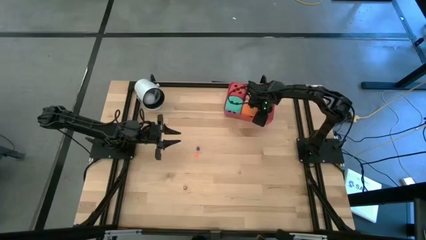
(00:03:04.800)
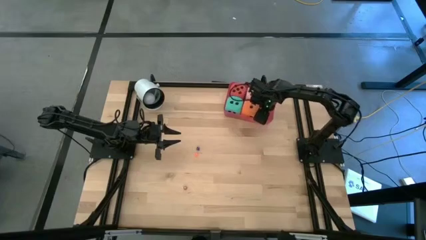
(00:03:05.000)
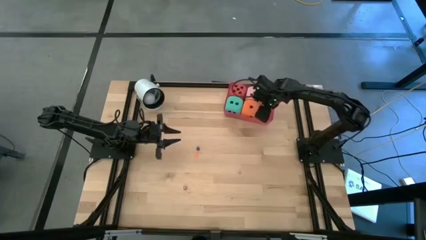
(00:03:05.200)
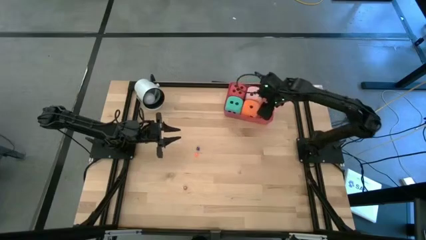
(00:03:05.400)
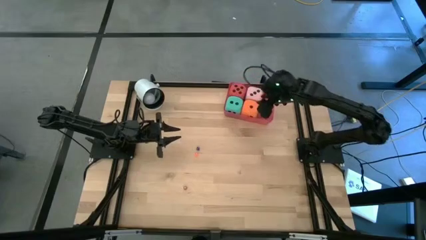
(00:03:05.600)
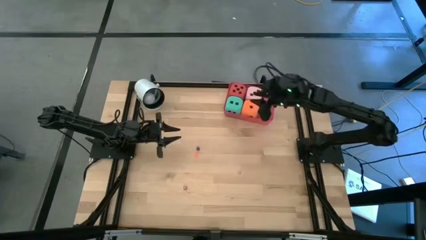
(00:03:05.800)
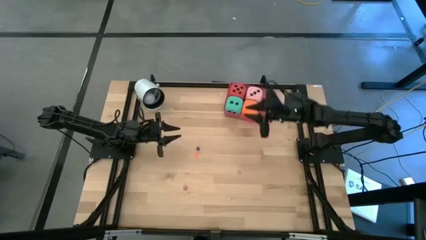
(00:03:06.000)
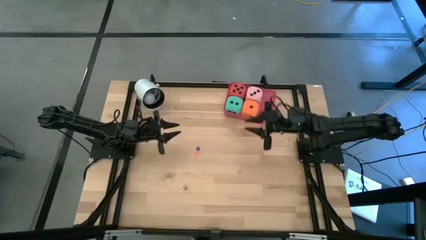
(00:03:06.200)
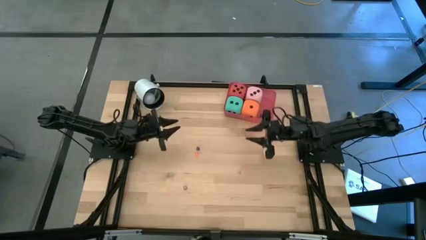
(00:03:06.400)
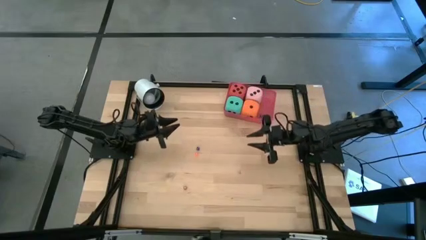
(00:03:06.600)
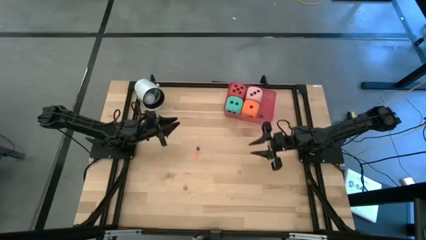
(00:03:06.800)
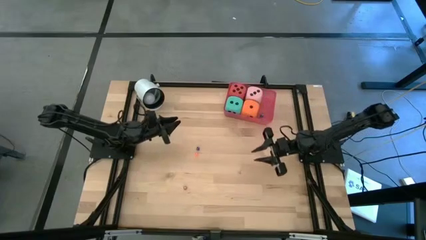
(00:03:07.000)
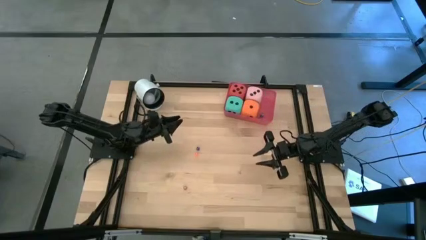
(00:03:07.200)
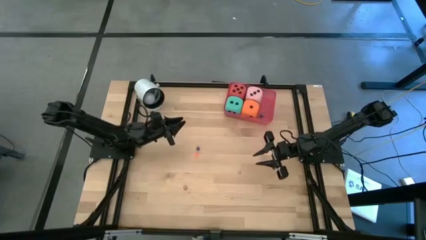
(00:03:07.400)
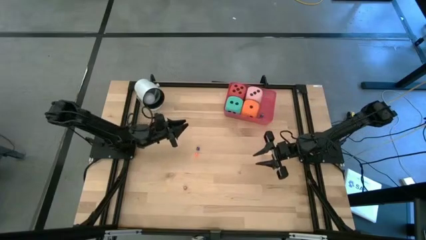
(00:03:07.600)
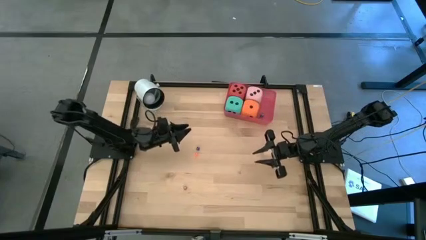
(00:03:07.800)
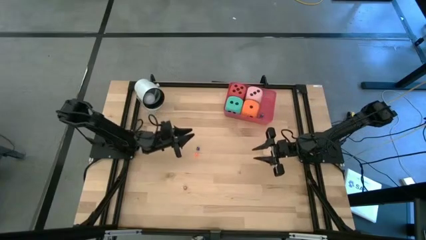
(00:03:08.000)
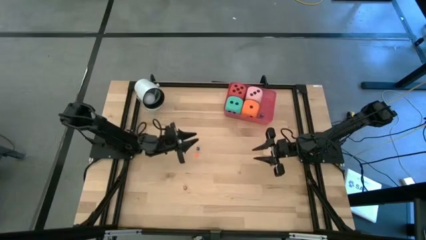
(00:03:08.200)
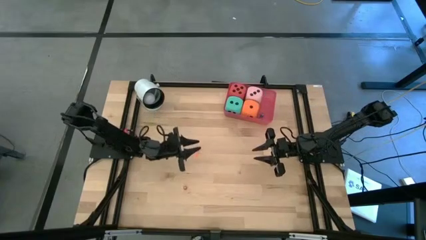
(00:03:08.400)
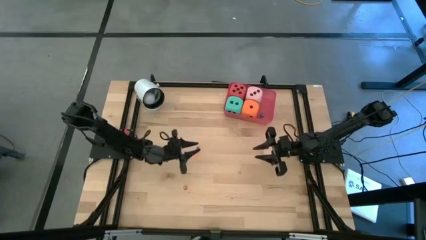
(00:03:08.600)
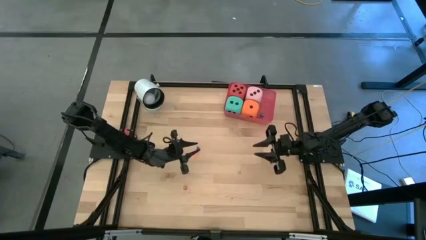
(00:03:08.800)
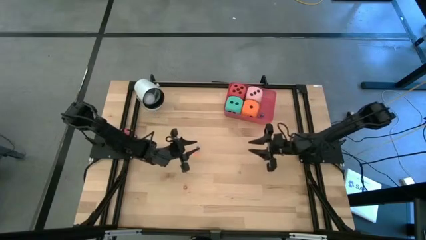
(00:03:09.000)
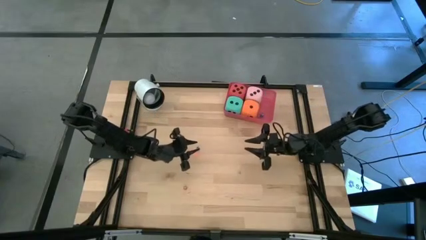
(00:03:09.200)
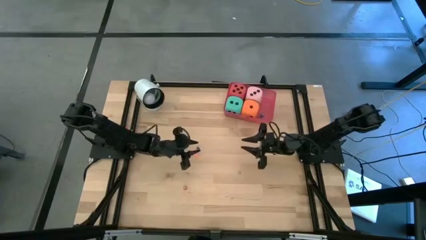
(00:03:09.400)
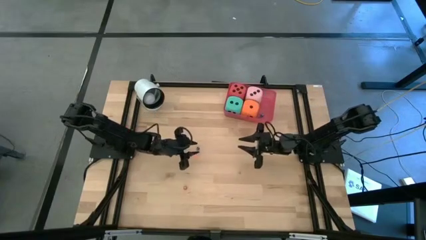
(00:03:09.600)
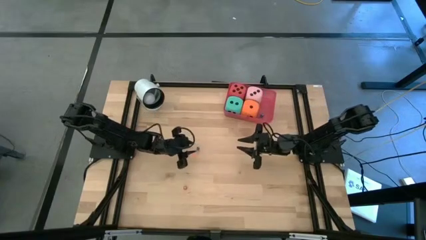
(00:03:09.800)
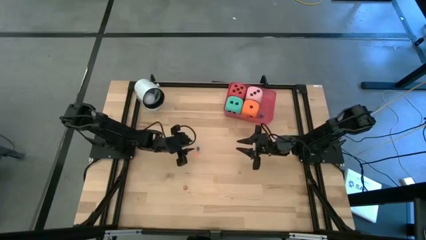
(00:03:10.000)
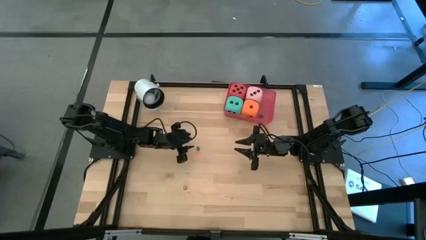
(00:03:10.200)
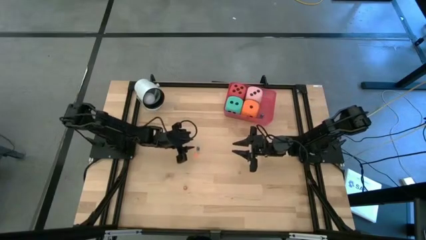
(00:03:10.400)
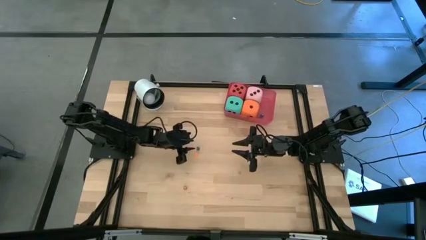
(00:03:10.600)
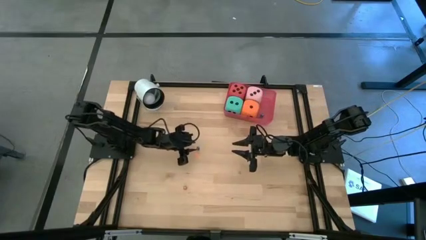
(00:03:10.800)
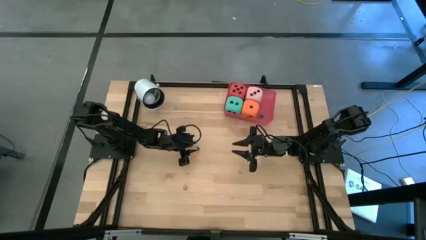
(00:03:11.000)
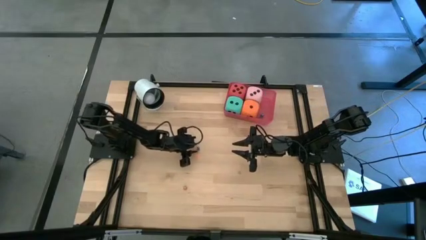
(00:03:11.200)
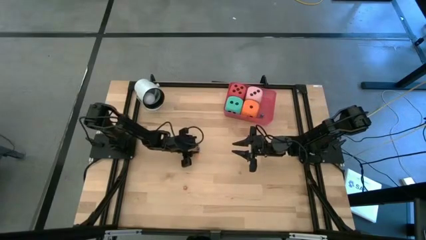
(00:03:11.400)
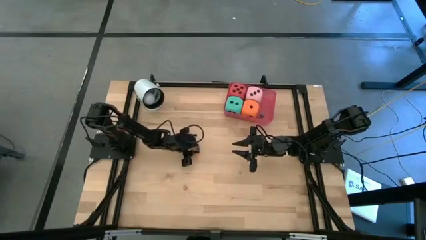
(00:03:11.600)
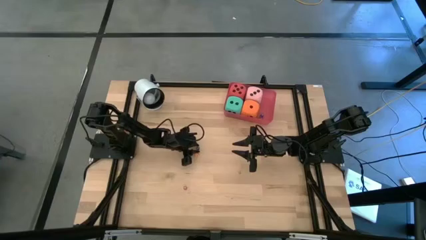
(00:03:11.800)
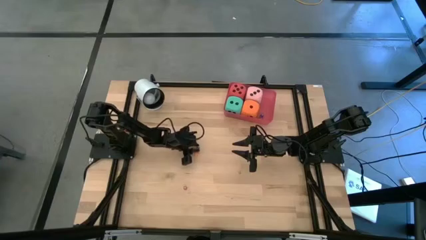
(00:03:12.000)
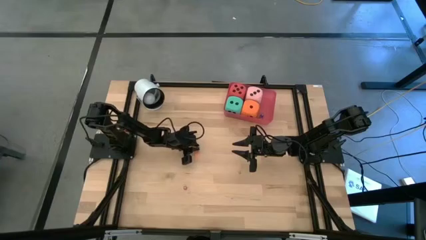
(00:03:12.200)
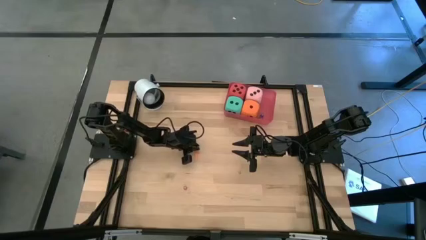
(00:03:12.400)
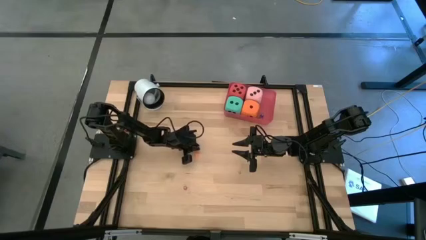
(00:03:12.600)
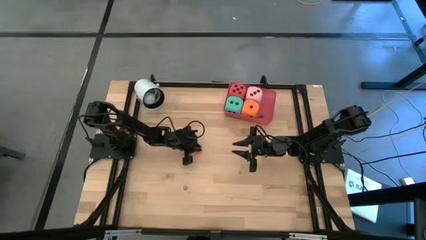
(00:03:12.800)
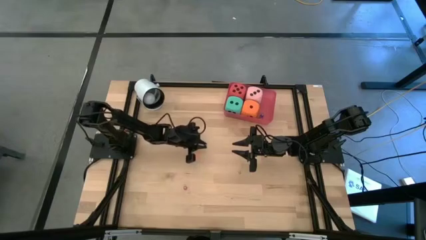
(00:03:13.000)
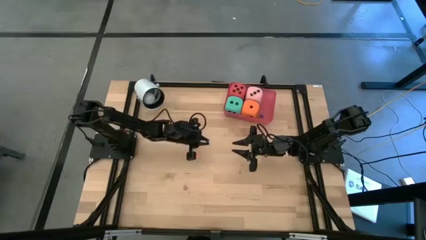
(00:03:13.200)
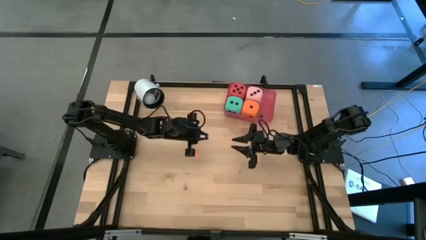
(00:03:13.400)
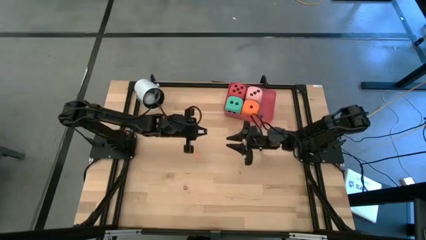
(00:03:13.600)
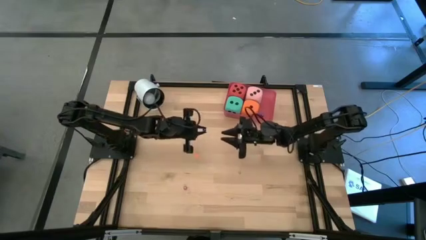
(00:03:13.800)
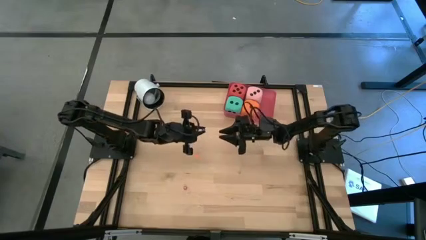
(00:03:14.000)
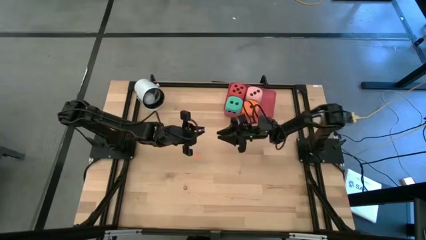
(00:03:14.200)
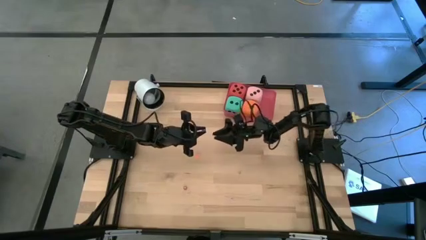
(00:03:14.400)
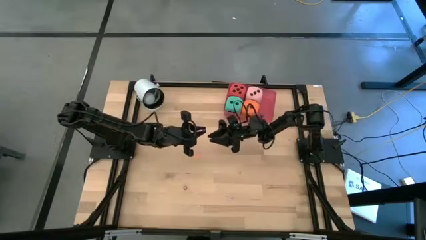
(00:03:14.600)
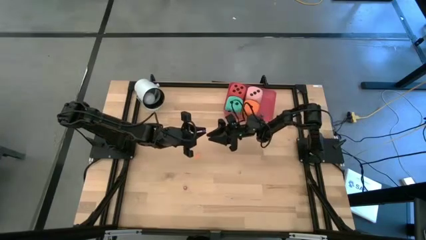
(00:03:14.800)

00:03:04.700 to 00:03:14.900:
Task: Pick & Place Dice
Put the small blue dice into the red bin
